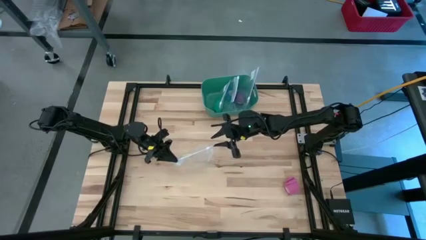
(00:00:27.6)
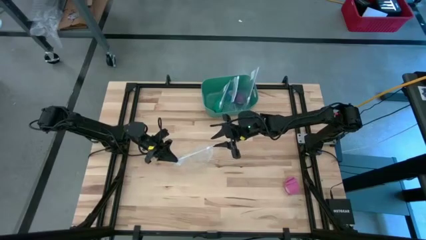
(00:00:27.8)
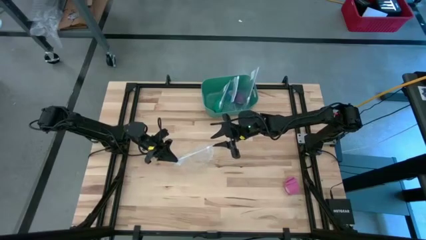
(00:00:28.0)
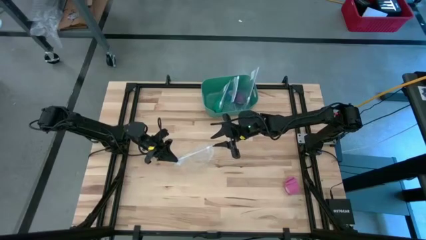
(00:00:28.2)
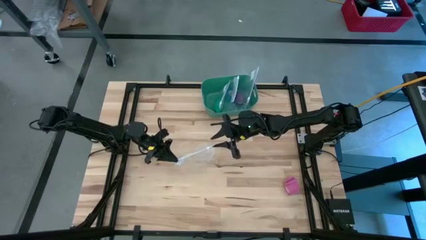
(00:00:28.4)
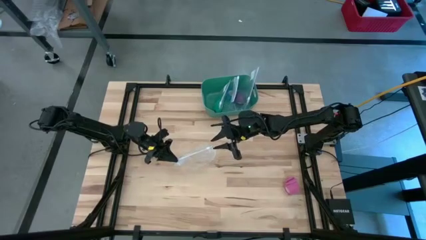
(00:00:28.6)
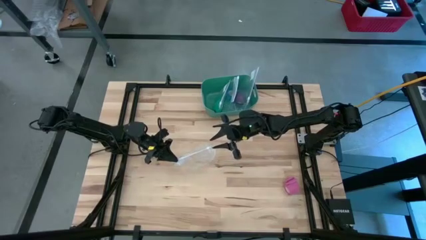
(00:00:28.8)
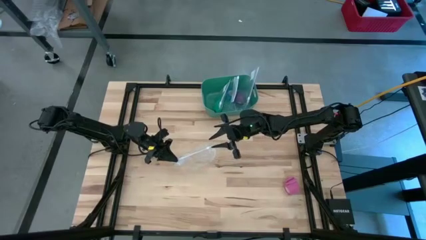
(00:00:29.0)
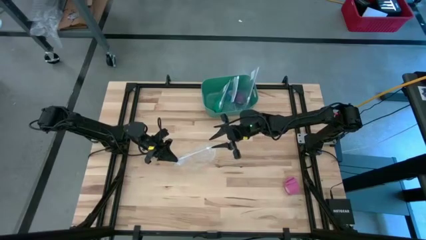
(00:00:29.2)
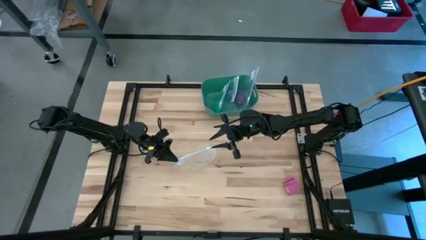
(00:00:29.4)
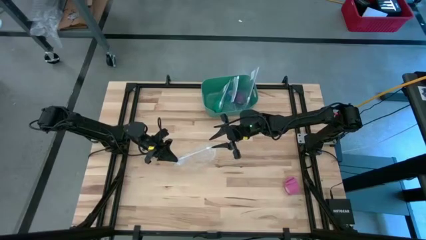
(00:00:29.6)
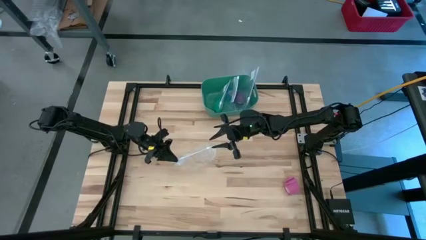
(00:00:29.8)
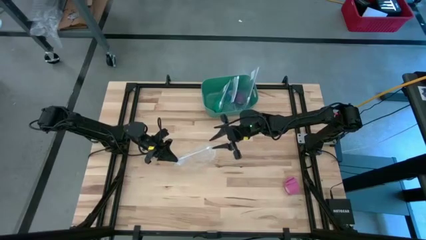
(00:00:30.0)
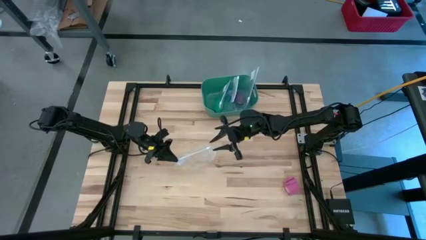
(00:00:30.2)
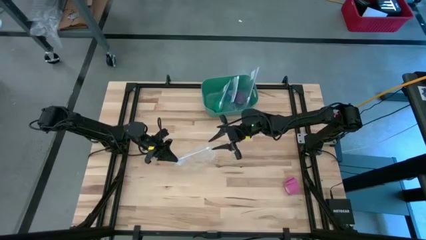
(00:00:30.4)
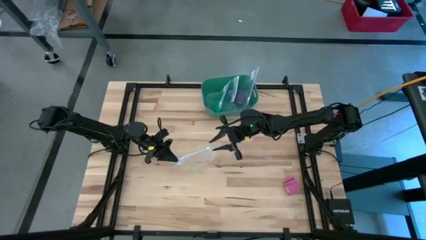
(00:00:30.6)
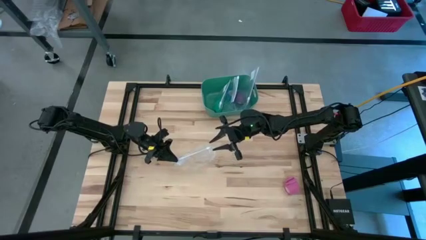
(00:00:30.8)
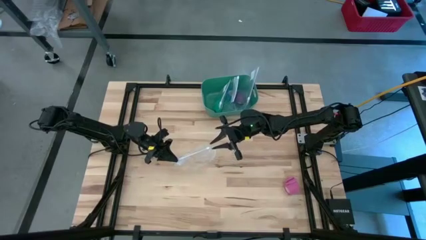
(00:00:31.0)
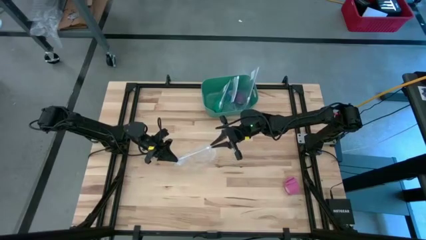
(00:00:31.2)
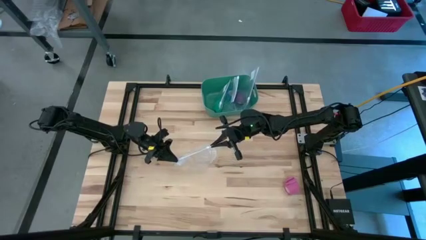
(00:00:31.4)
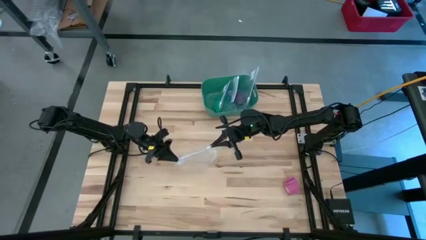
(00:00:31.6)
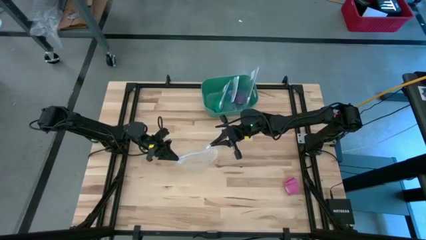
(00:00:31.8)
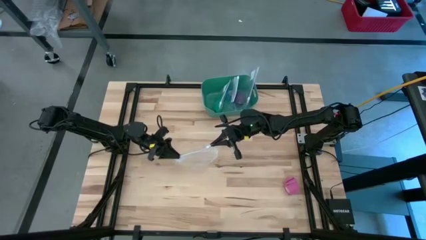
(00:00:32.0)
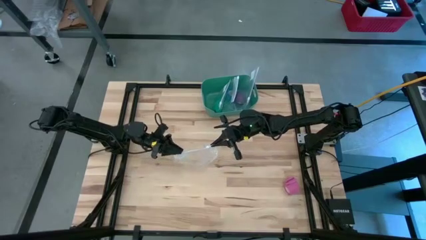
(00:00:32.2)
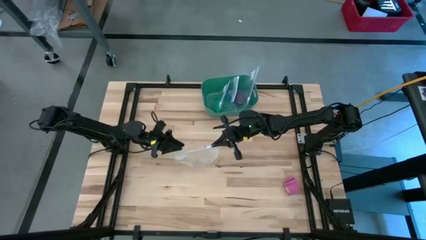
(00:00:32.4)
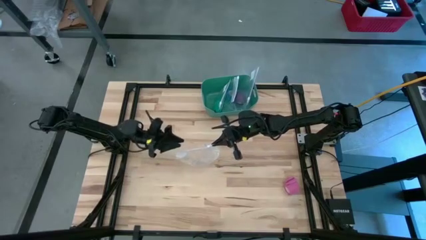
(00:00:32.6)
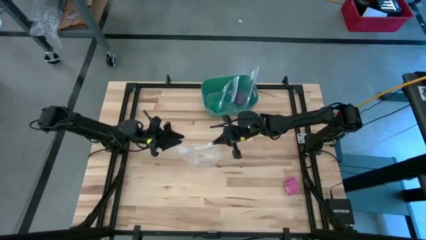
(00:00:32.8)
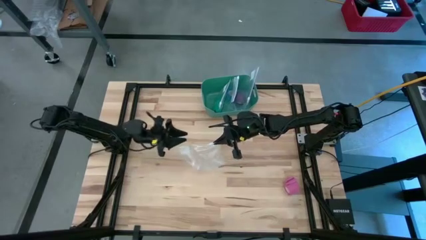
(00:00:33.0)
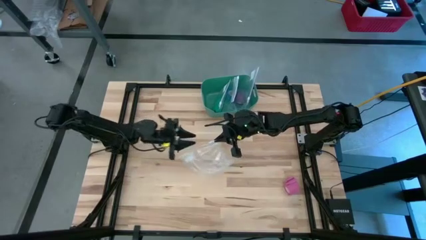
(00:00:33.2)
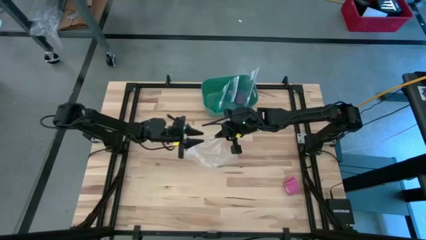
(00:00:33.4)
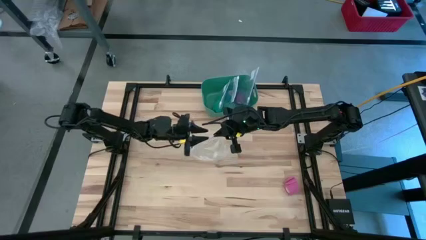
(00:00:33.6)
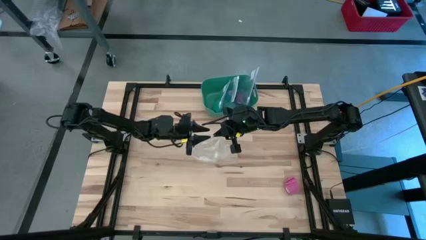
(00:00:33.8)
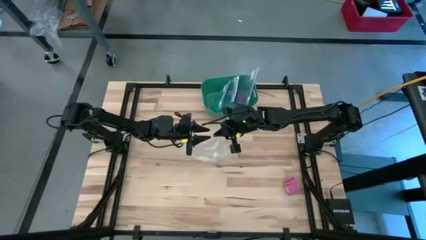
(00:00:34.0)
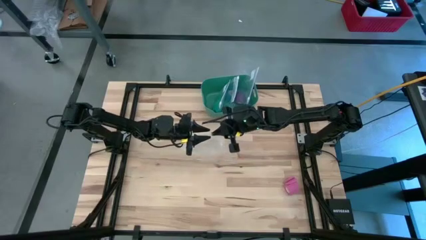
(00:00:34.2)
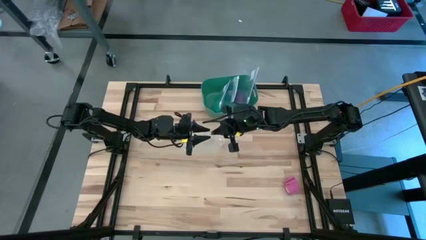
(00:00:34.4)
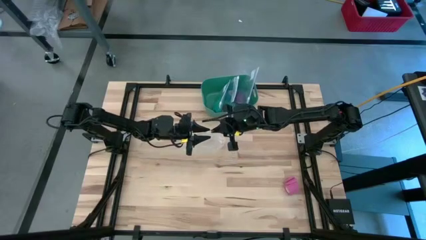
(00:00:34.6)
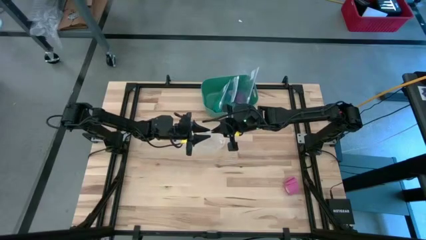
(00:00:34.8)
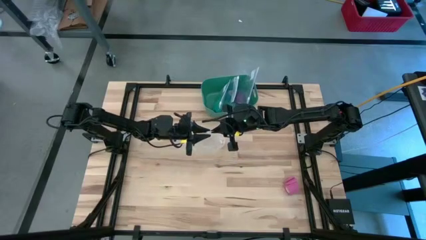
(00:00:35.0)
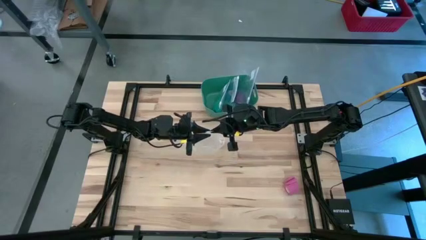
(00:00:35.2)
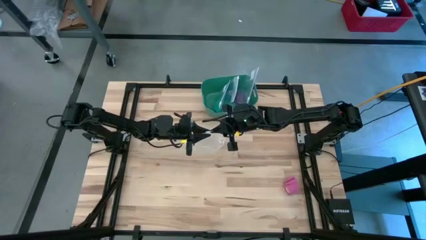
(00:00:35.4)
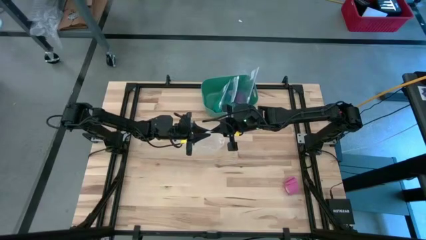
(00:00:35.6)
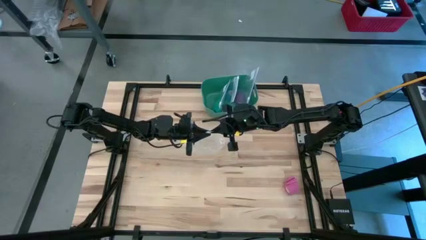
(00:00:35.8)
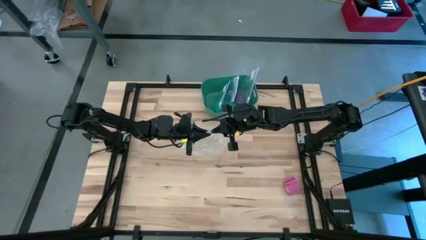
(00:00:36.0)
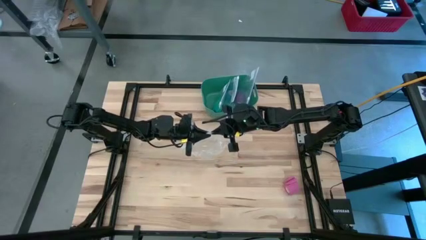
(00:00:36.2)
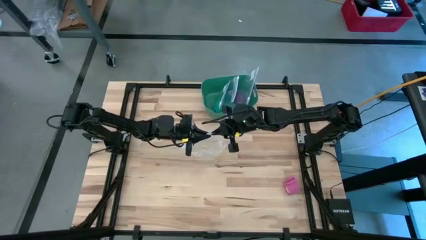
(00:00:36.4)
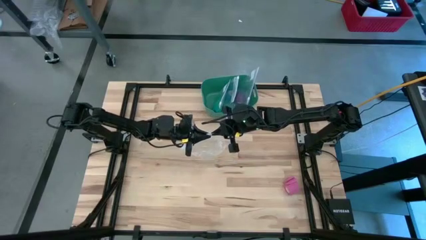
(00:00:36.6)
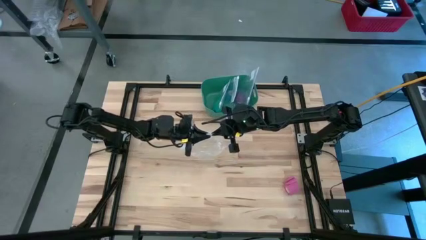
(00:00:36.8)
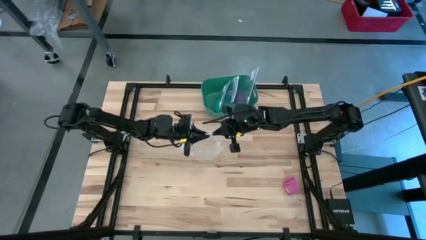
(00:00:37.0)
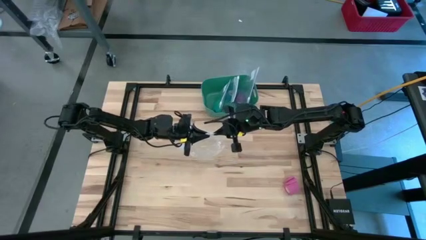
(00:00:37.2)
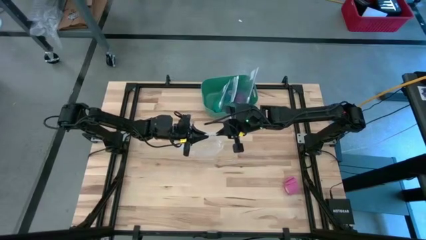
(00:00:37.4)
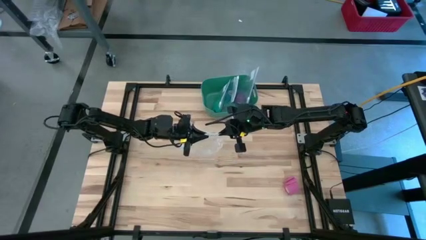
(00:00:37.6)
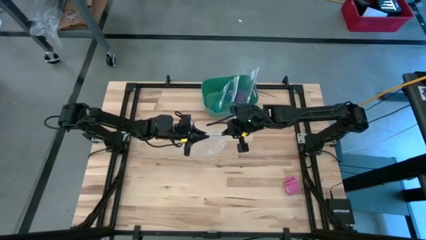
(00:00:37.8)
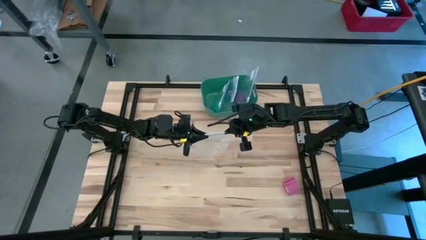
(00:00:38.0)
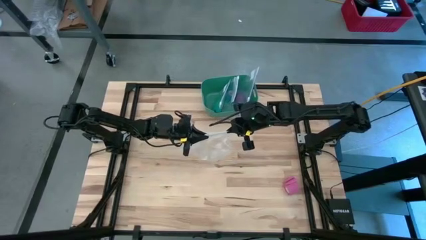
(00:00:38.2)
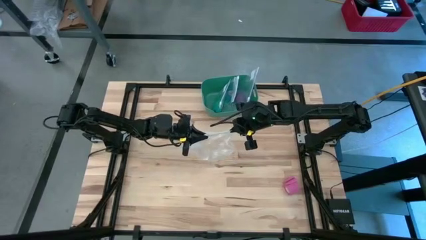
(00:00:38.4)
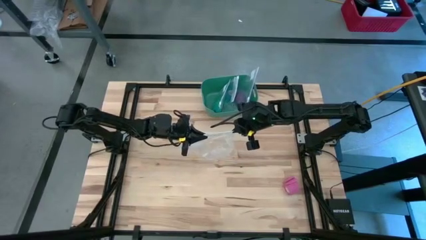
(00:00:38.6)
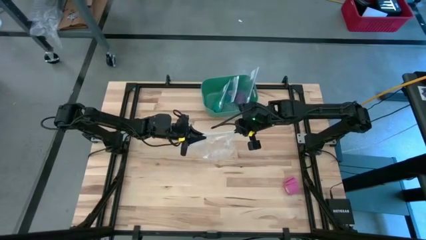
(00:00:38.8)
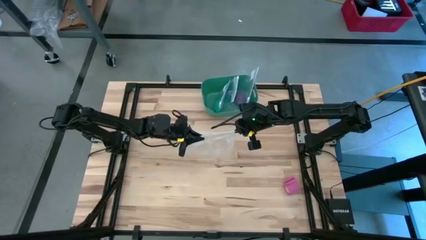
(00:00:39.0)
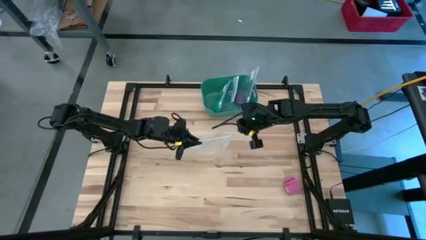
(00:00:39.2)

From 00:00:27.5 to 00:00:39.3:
Task: Roll bandage
Open the transparent zip bag
